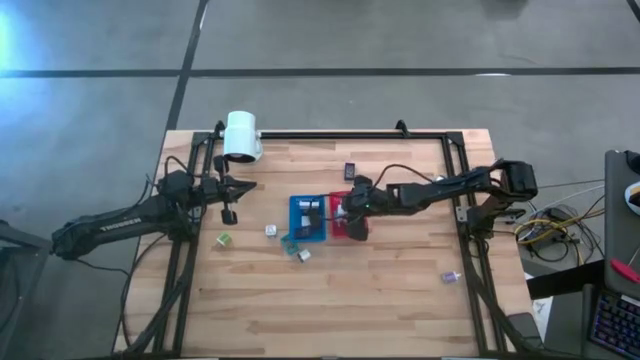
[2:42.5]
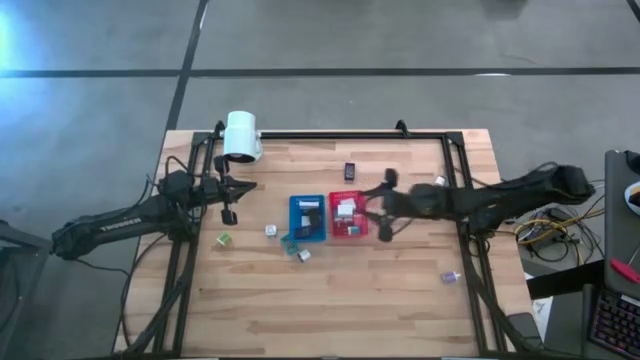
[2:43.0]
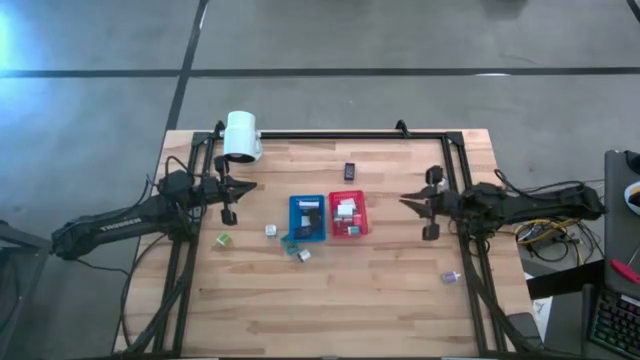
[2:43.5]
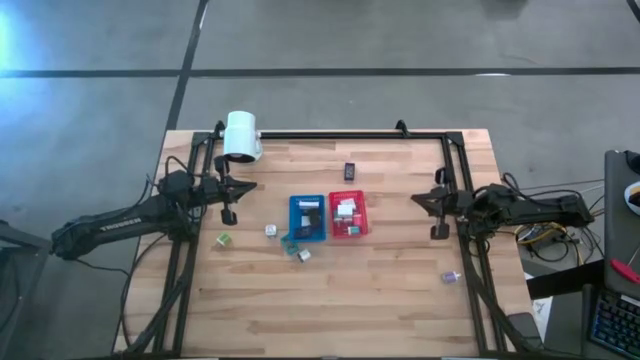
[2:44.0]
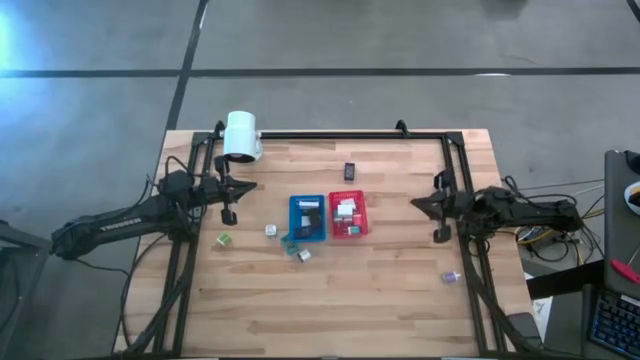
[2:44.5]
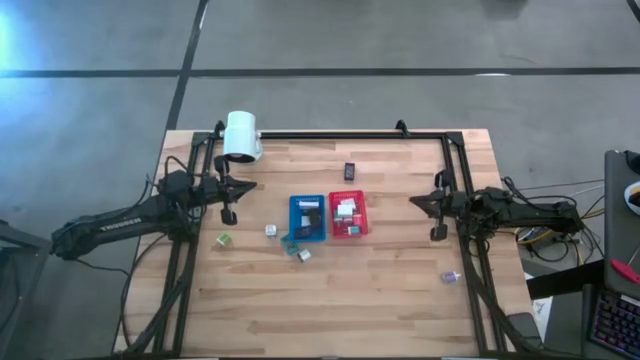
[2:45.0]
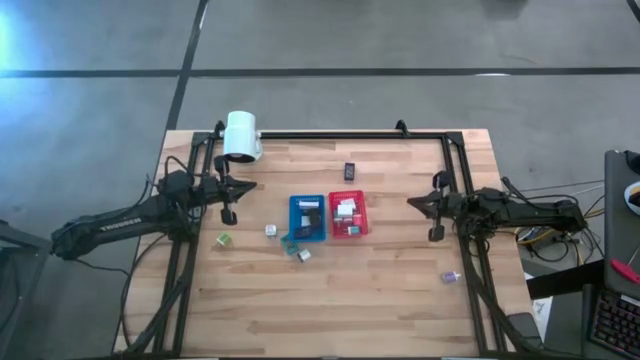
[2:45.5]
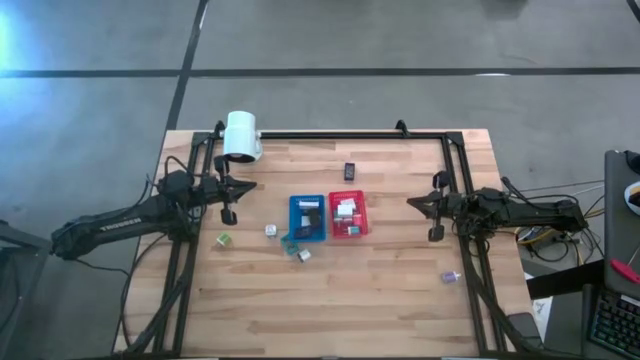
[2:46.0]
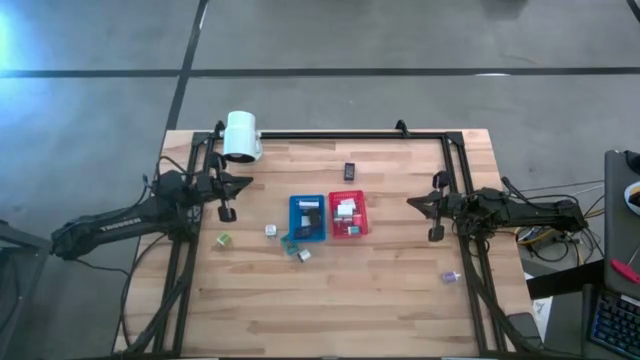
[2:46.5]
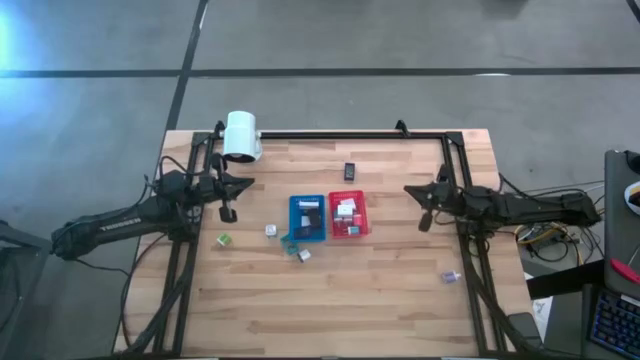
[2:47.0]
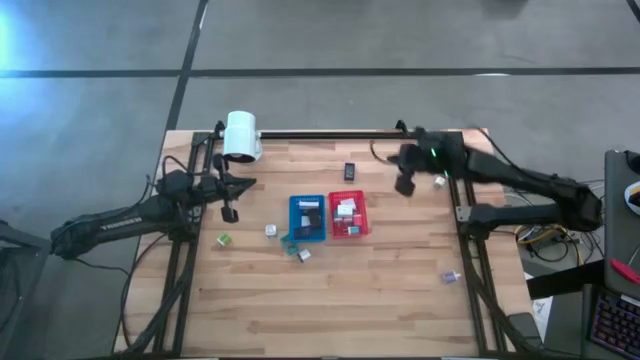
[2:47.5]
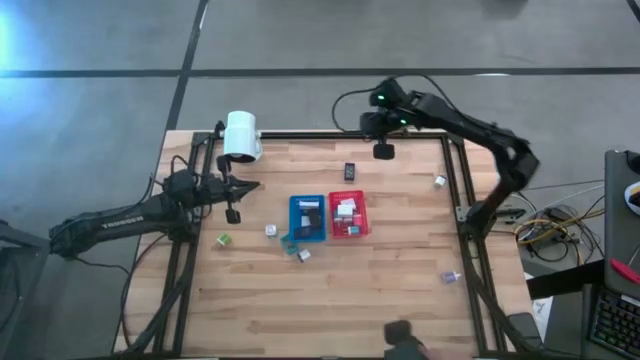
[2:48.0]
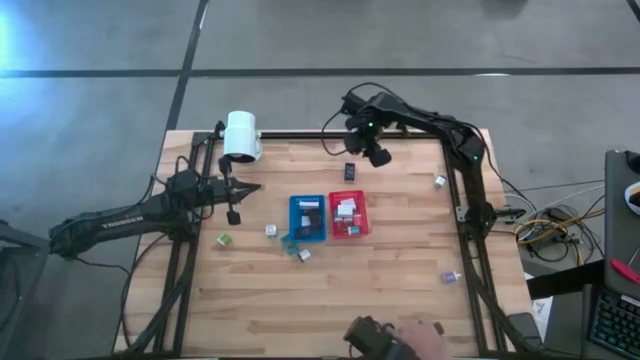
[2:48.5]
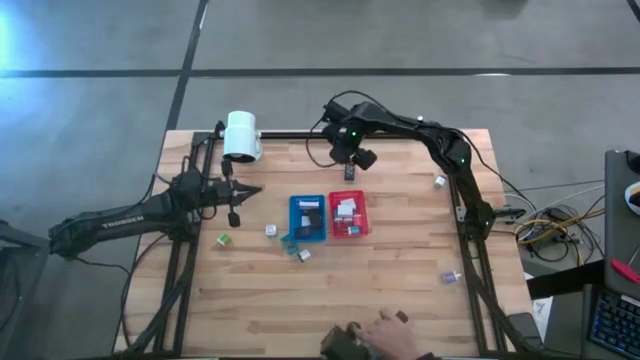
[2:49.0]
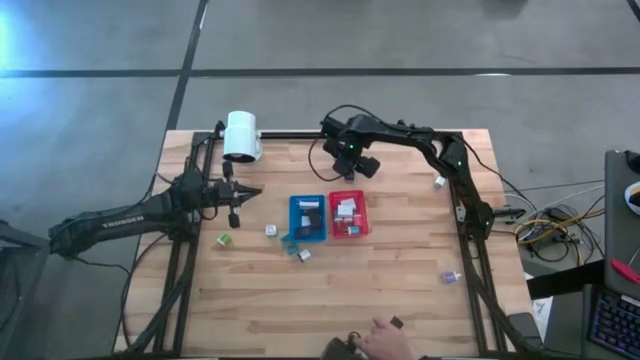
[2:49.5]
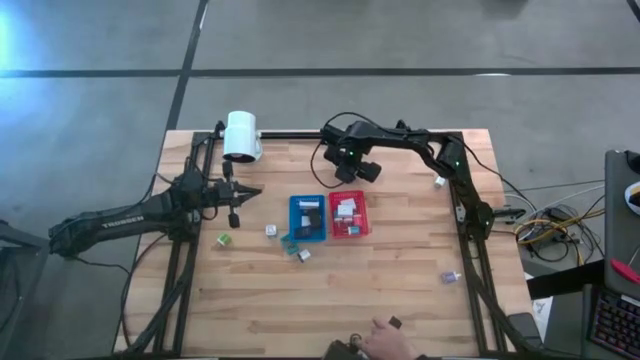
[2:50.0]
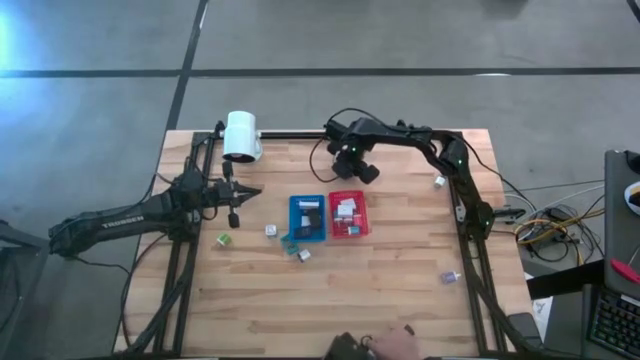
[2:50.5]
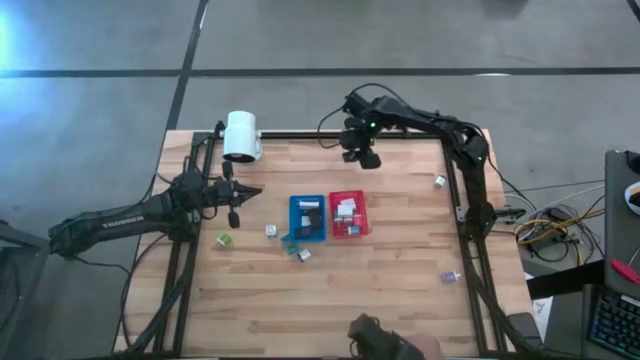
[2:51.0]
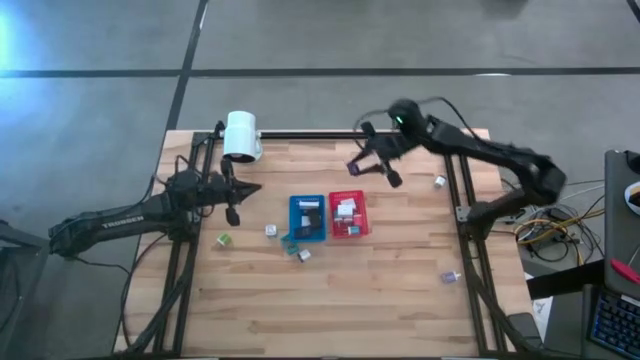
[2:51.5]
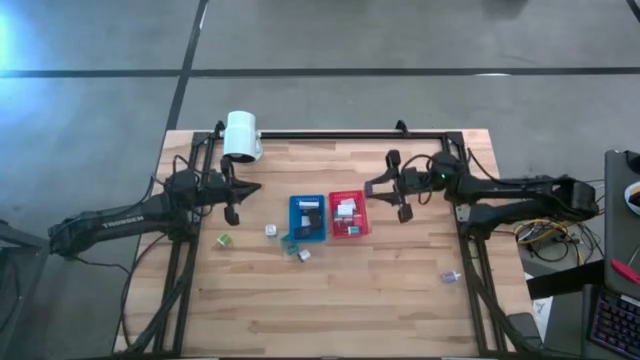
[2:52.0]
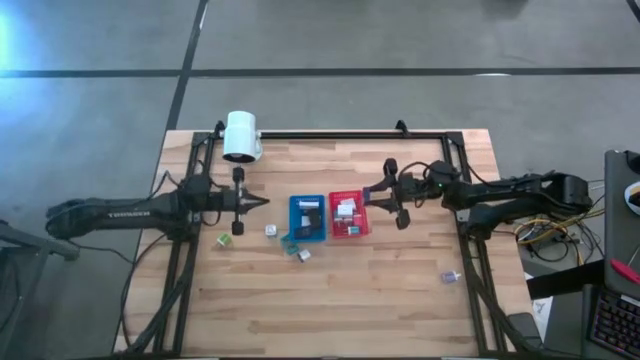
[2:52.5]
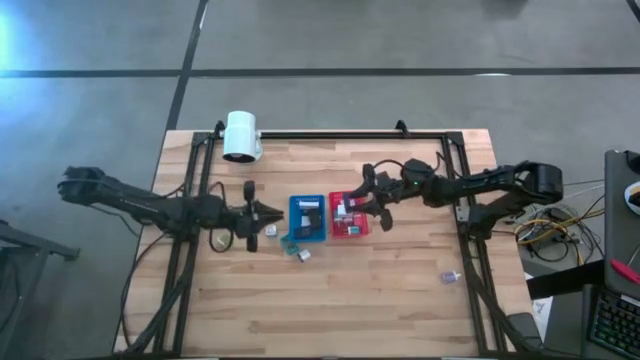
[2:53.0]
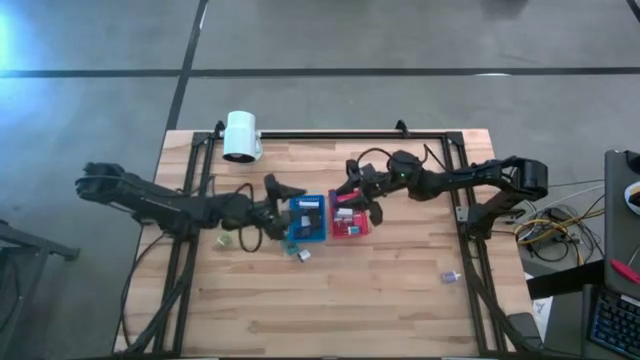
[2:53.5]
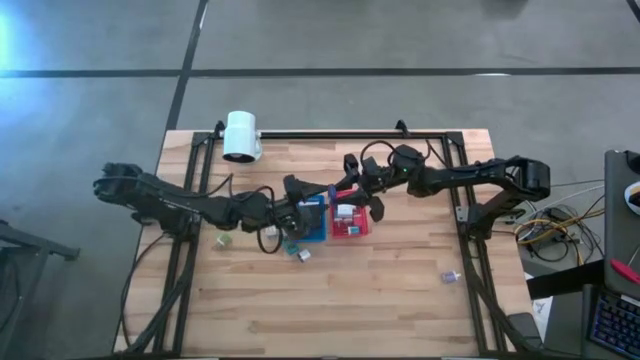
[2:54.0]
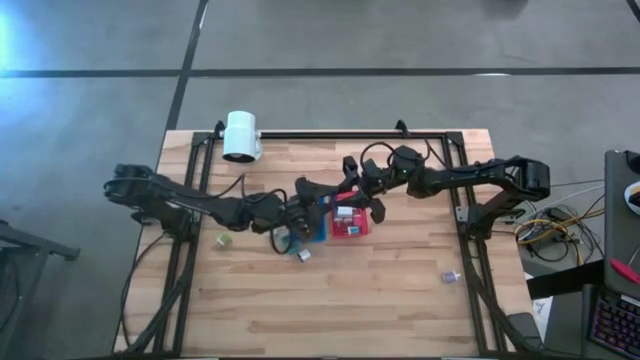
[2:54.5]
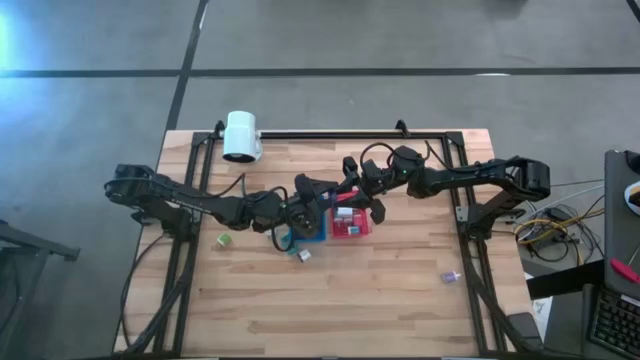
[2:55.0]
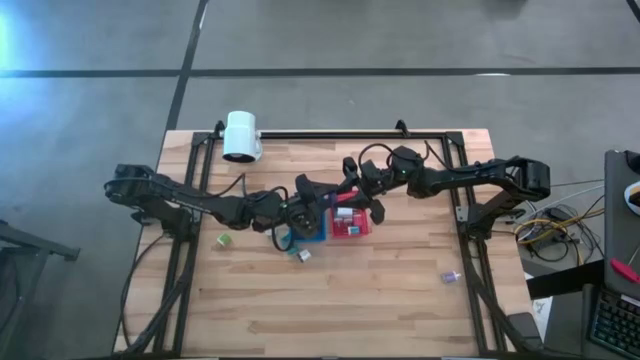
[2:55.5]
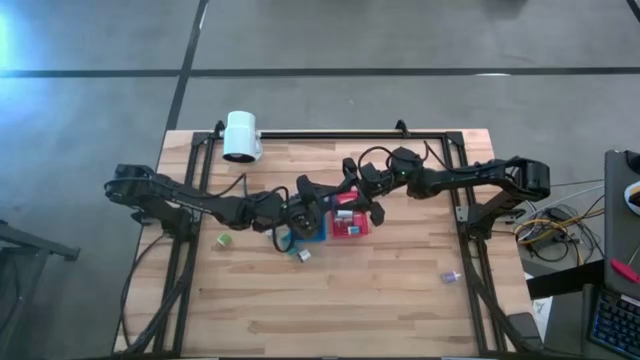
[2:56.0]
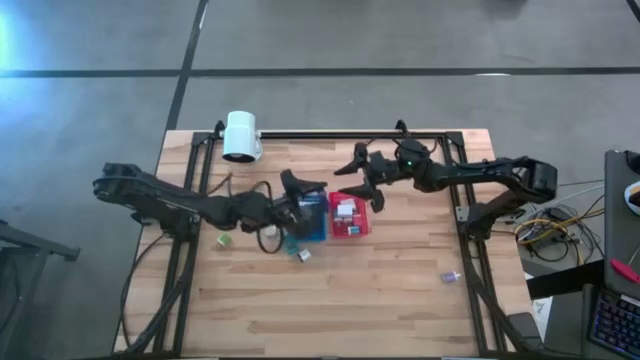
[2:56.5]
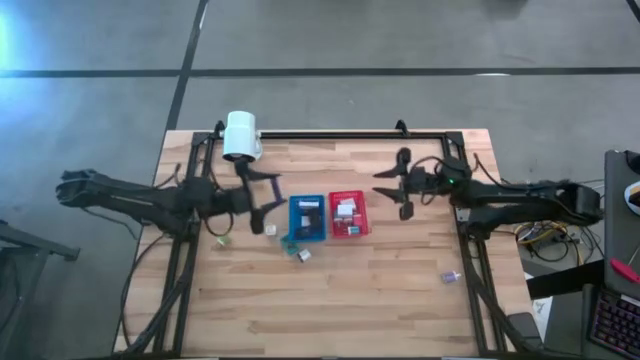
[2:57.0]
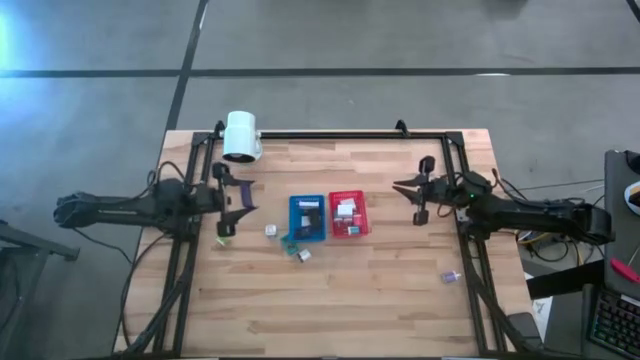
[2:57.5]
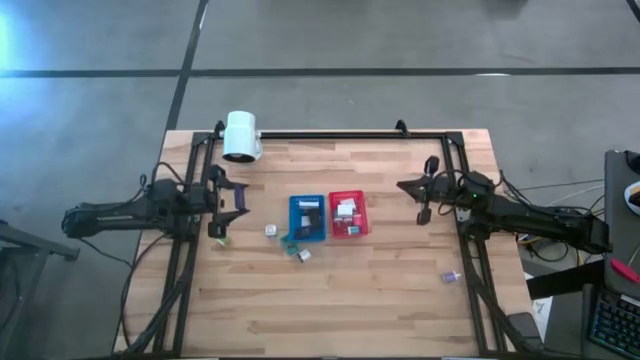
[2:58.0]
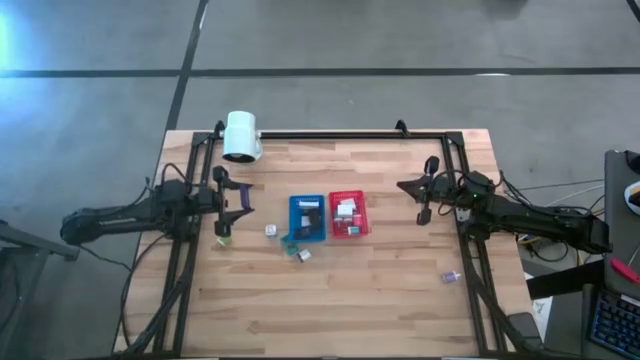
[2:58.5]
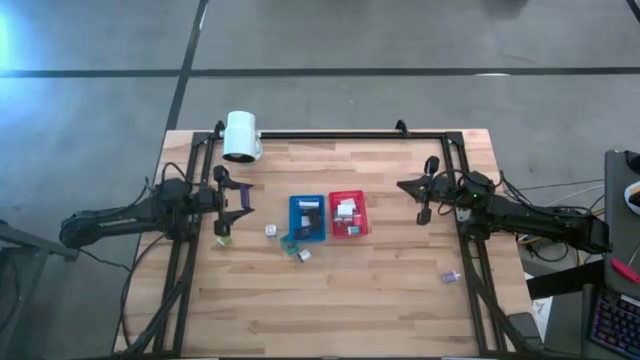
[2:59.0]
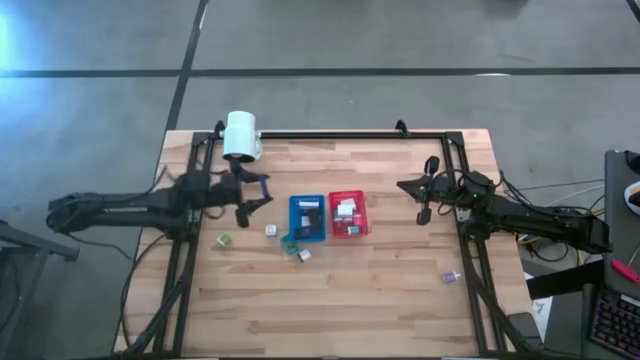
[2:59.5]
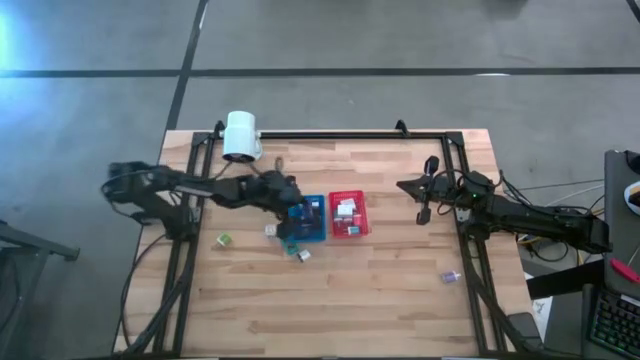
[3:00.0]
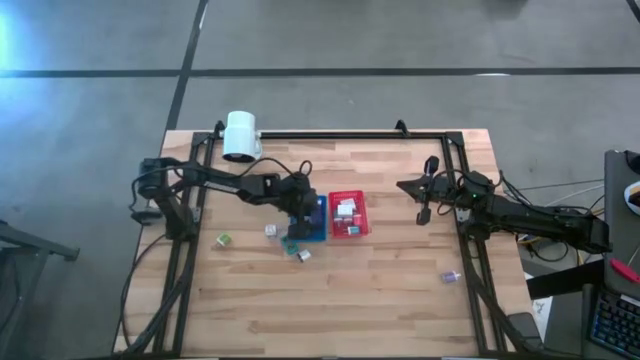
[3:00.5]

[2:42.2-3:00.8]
Task: Pick & Place Office items
Put the dark blue digital clock into the blue bin

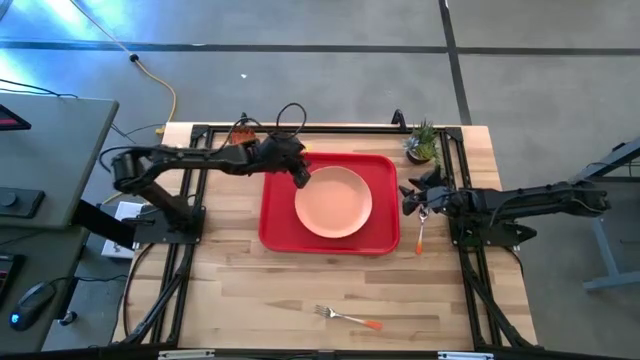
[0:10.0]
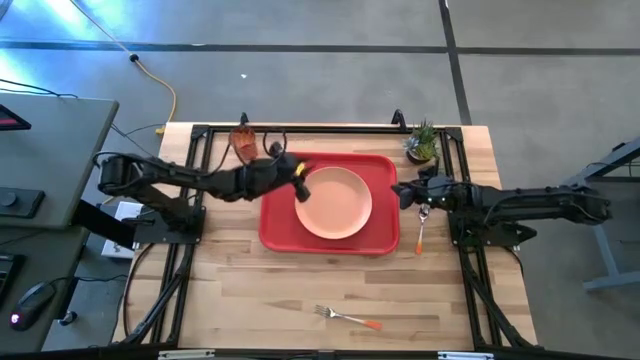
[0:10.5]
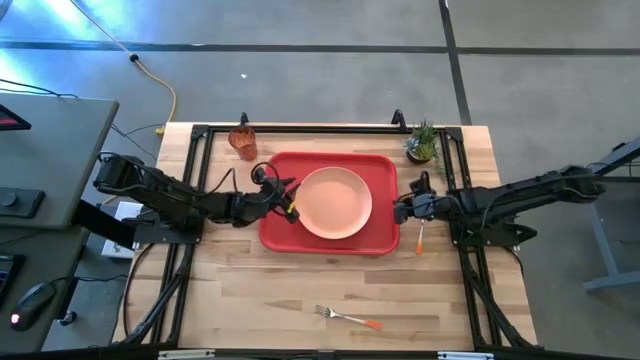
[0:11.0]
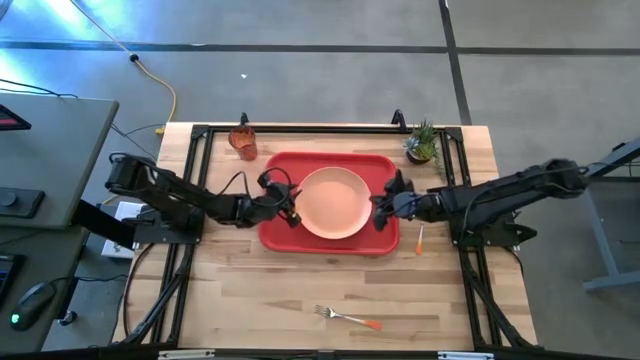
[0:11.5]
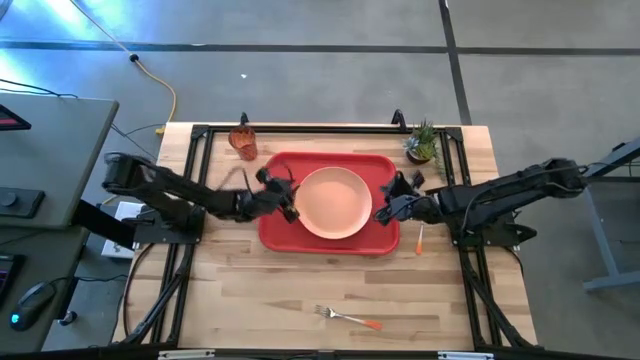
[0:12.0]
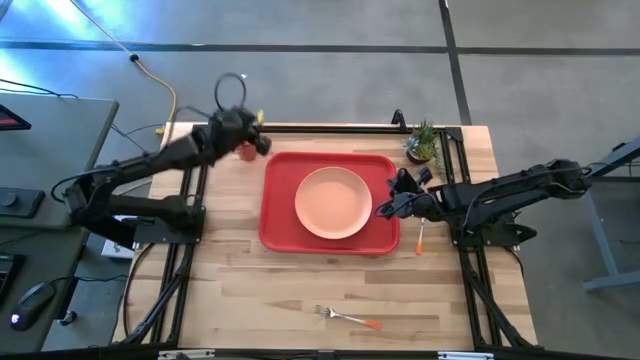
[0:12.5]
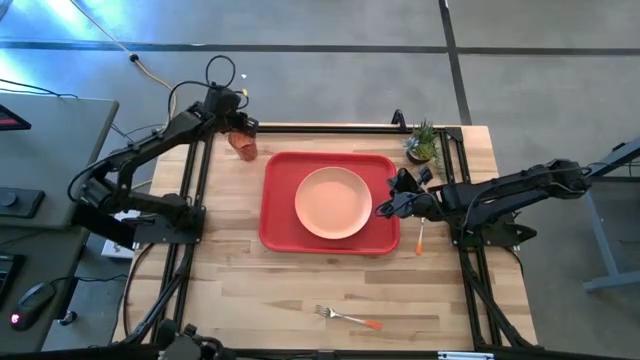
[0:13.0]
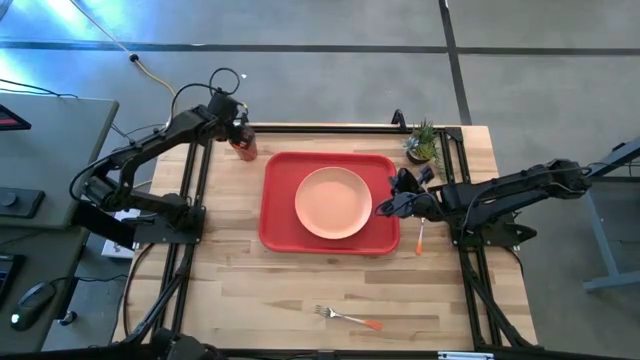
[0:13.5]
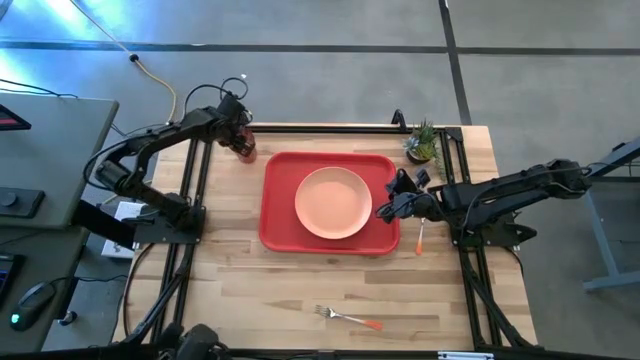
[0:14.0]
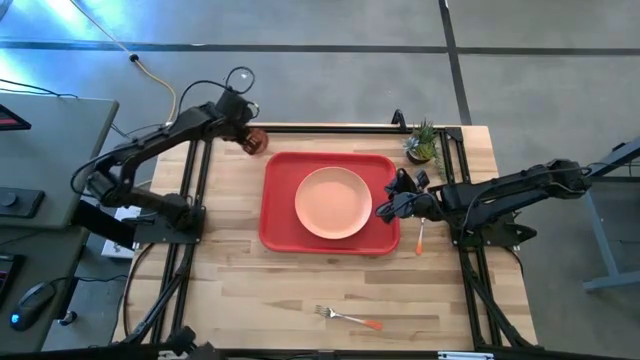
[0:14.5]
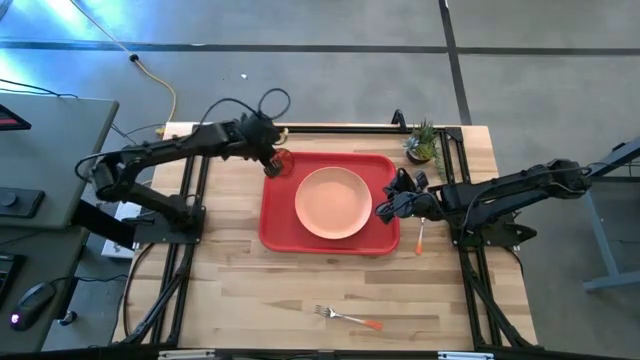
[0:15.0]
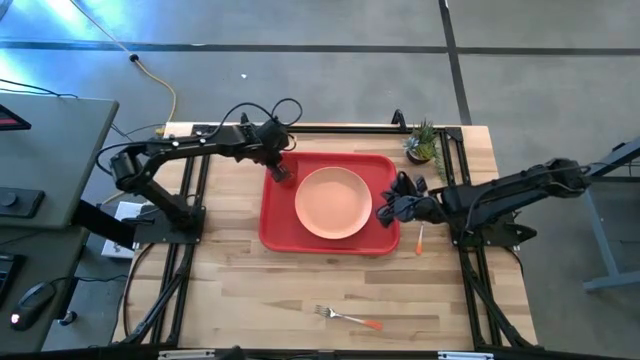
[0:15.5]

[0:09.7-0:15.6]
Task: Pick and place plate/cup/fork/spoon on tray
Put the brown cup on the red tray to the top left of the orange plate
